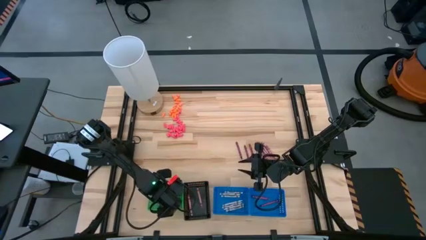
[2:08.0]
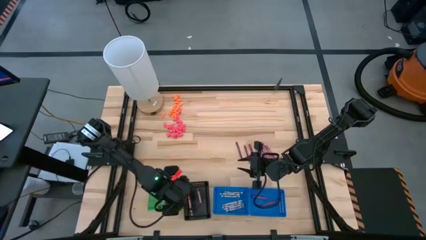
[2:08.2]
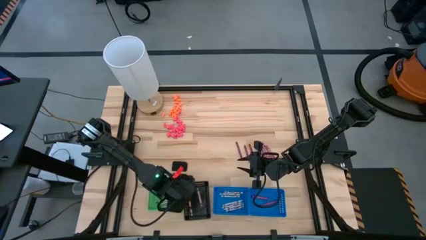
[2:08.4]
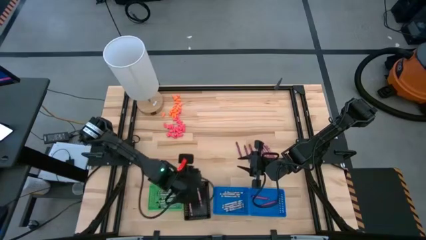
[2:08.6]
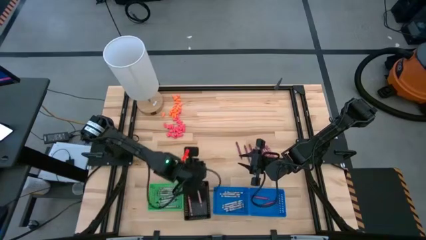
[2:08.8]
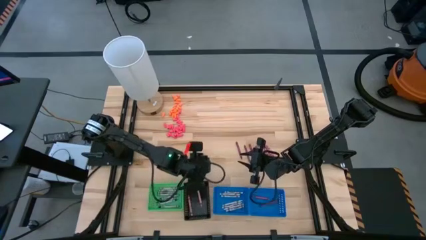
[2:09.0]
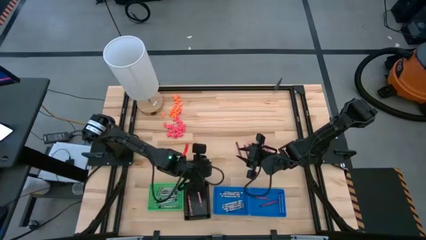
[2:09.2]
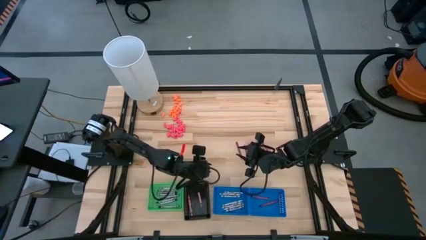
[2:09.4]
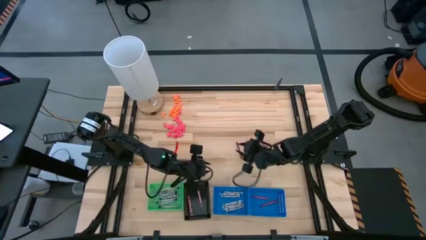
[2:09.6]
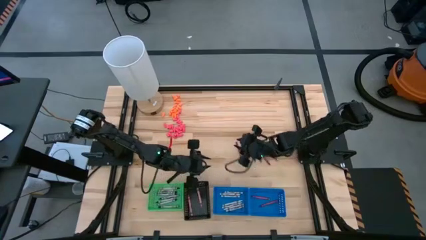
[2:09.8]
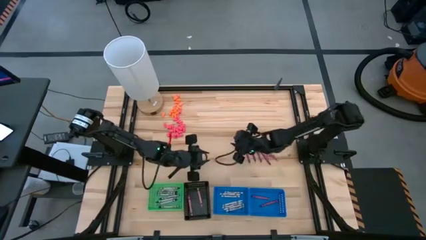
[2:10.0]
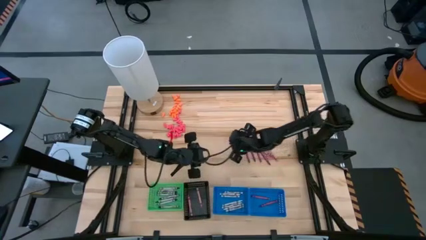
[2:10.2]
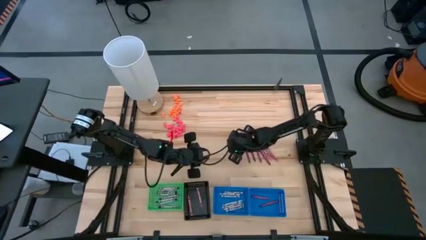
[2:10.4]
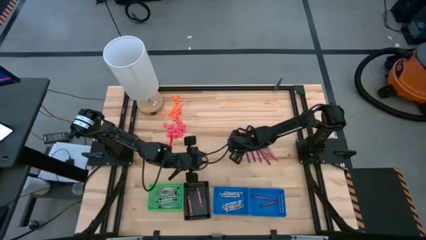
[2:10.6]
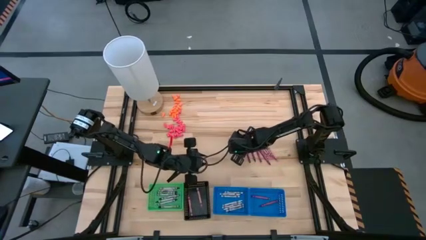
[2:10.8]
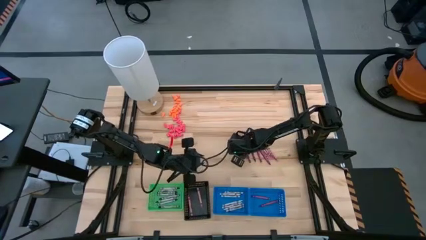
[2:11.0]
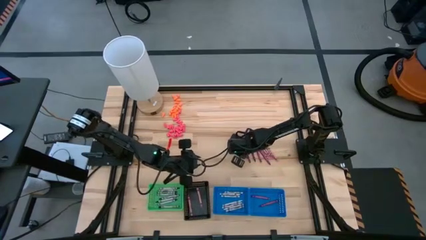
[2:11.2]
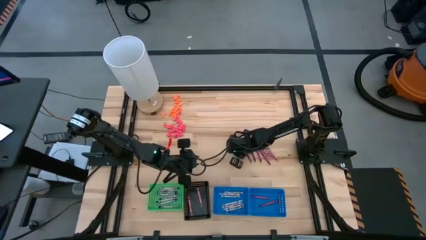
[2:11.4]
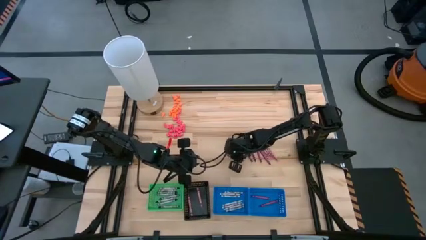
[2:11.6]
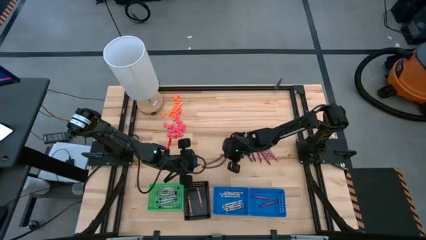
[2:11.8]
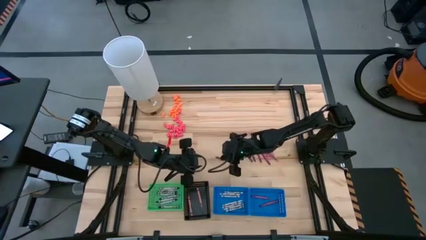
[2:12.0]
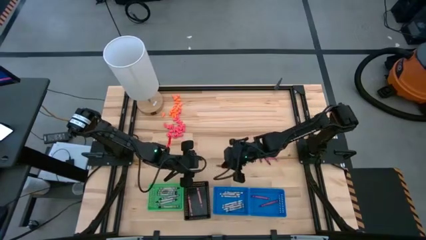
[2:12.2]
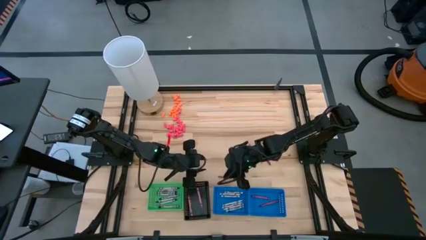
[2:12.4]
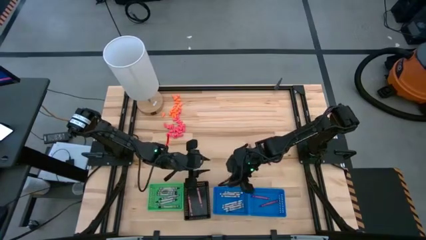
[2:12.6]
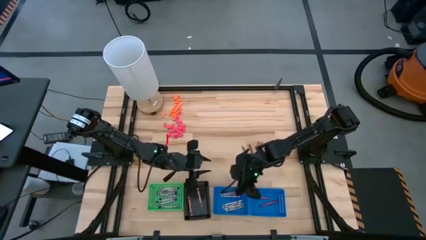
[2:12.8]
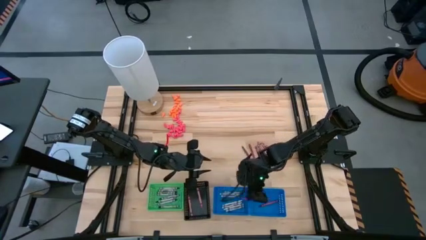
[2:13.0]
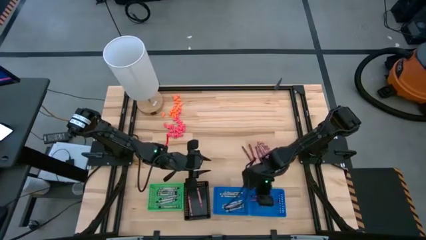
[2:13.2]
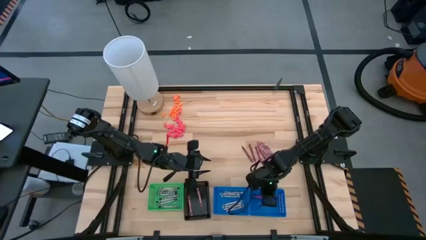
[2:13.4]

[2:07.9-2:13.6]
Task: Sort crayons
Put the red crayon into the right blue bin

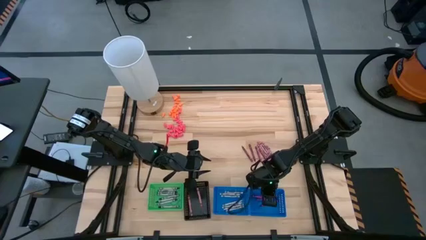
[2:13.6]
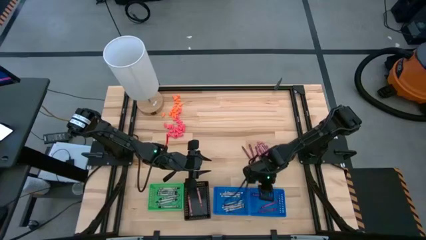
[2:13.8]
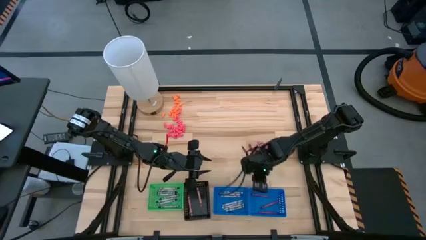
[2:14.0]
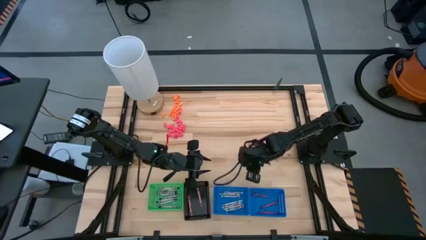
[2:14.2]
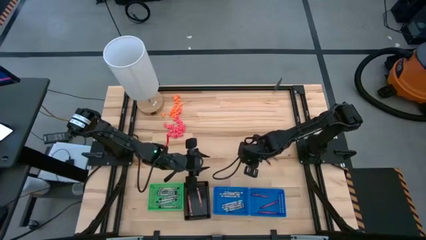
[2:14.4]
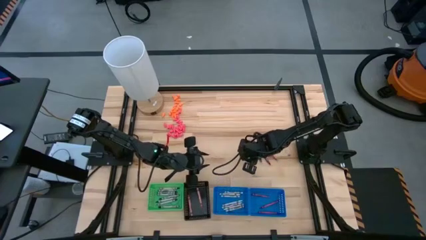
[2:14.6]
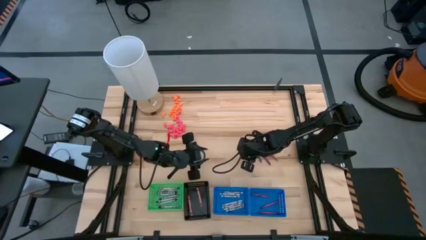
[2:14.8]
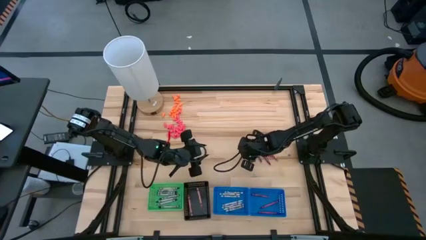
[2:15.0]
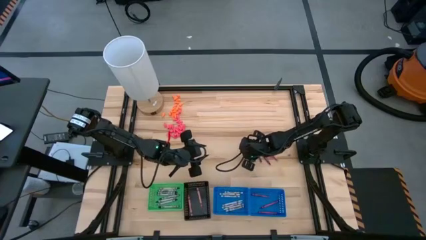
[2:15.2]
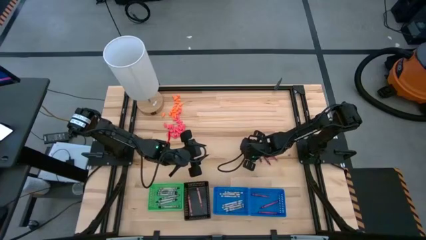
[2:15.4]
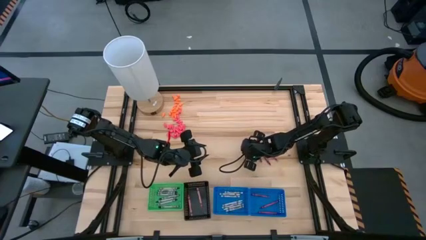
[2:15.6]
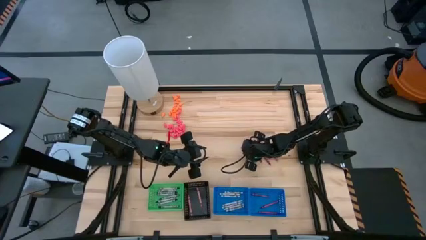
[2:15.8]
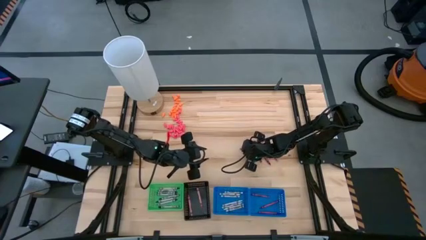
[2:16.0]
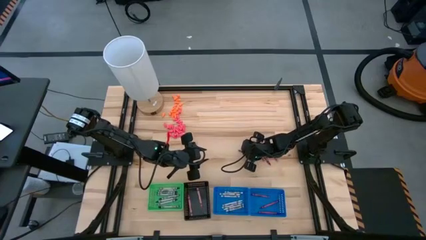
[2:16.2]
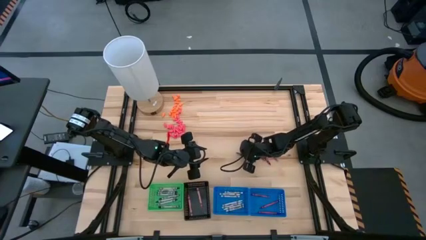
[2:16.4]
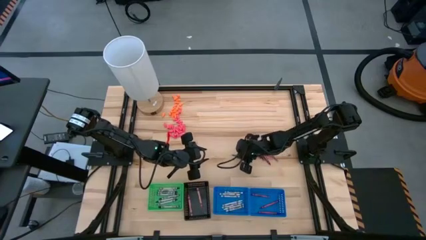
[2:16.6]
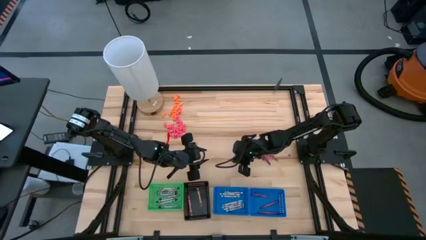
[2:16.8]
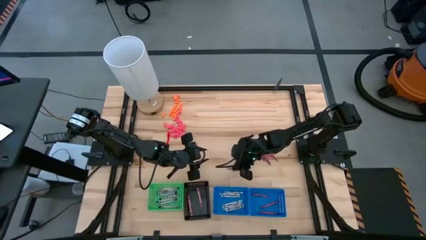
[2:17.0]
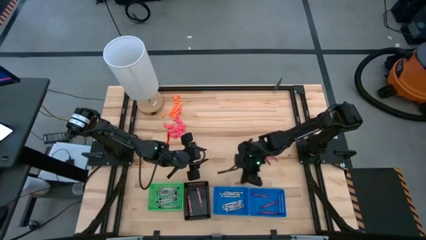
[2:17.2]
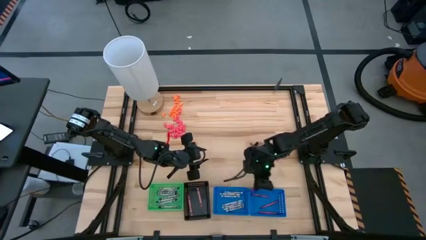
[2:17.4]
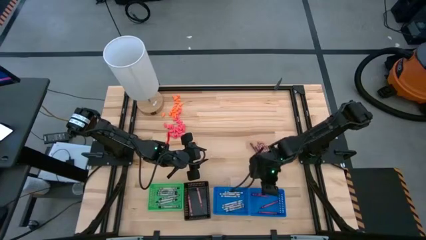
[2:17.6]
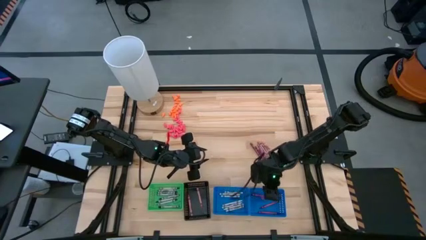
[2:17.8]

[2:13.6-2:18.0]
Put the red crayon into the right blue bin

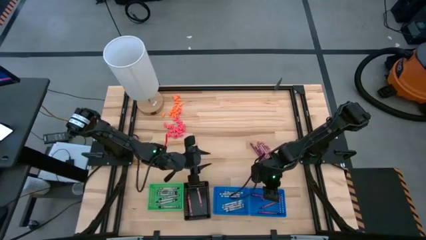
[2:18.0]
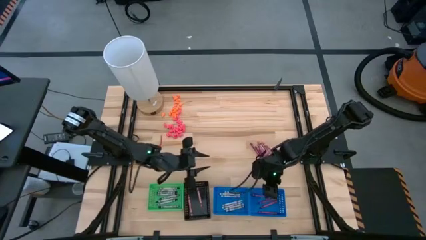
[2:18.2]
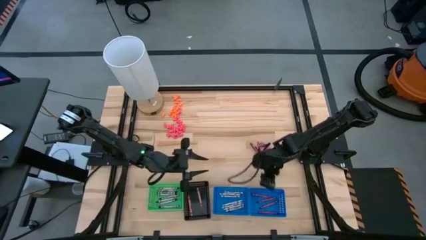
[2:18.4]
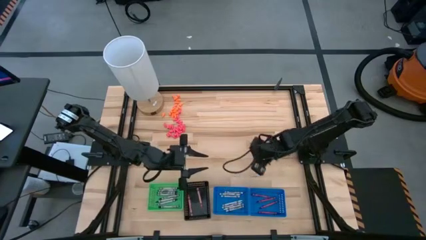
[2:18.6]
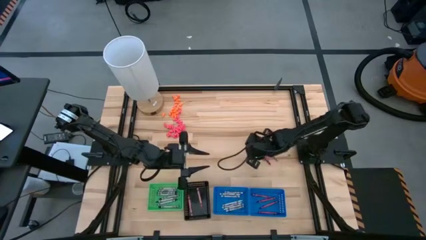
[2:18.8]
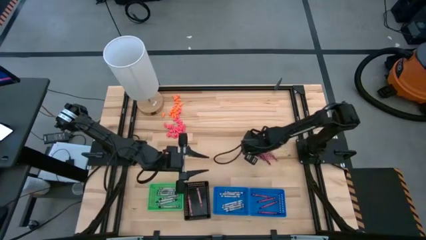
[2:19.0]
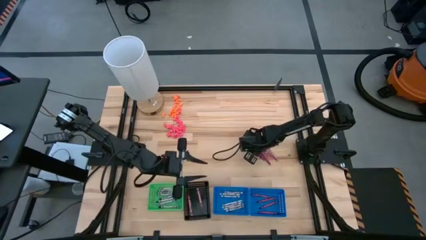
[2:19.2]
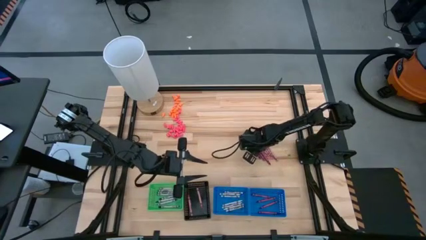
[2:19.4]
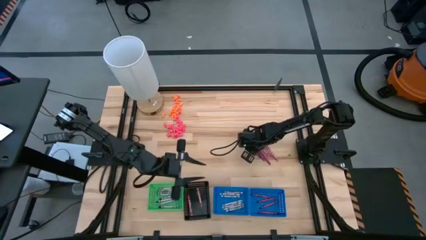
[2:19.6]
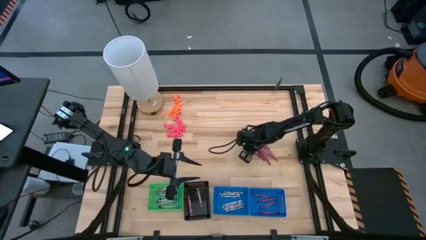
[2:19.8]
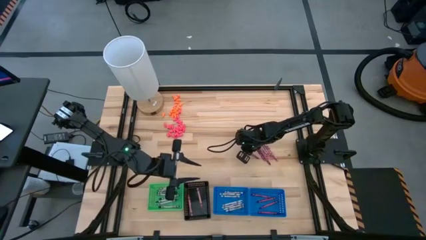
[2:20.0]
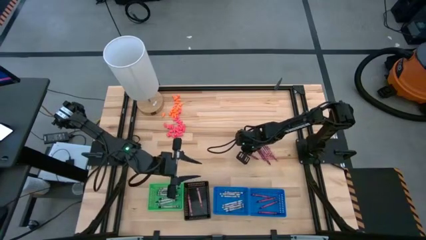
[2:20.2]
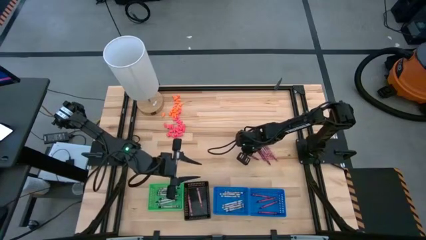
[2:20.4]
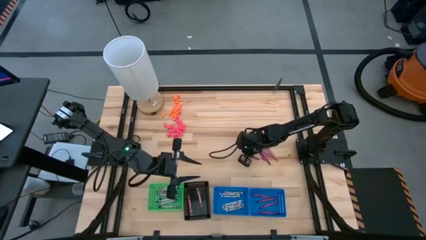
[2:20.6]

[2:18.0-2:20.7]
Put the red crayon into the right blue bin

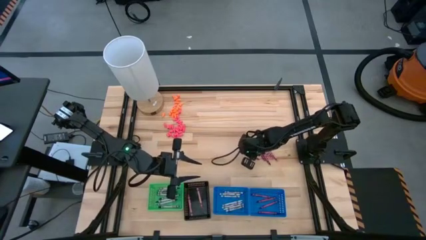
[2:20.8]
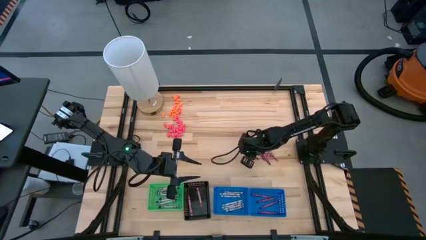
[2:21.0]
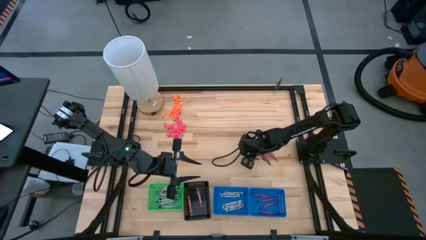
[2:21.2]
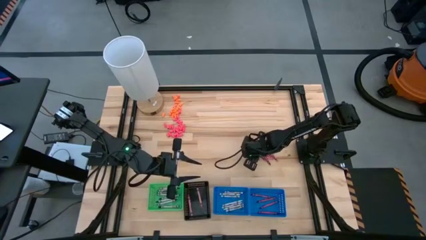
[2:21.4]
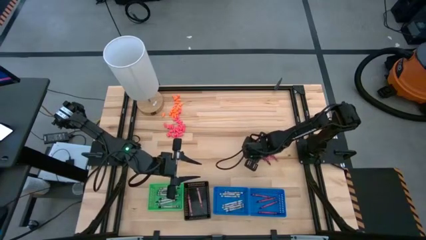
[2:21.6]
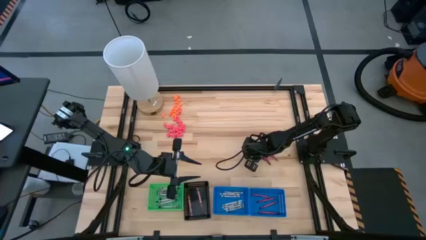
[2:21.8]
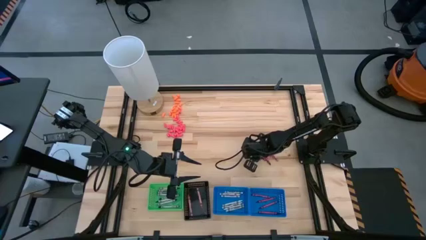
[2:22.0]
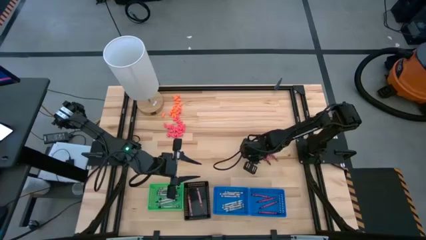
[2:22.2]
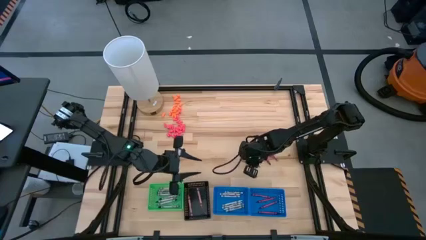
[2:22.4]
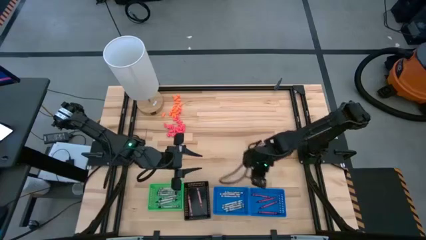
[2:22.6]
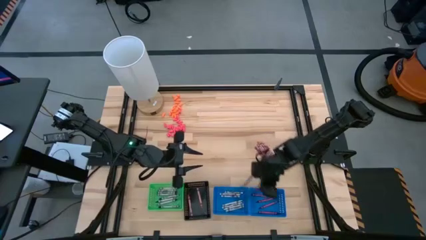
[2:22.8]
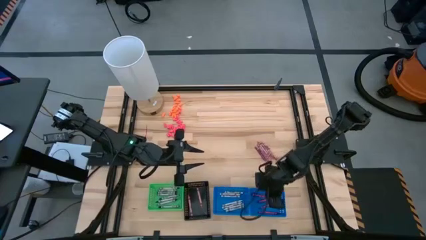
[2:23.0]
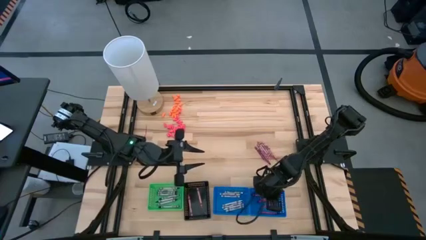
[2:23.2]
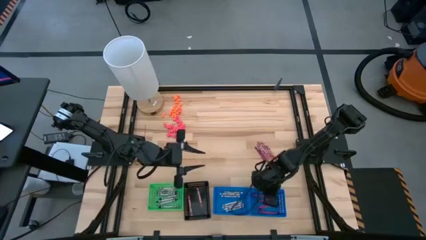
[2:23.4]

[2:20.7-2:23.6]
Put the red crayon into the right blue bin
